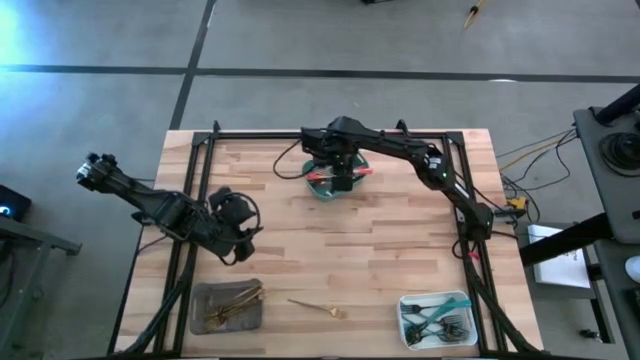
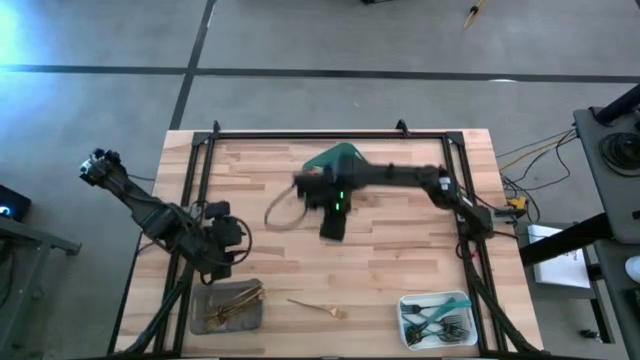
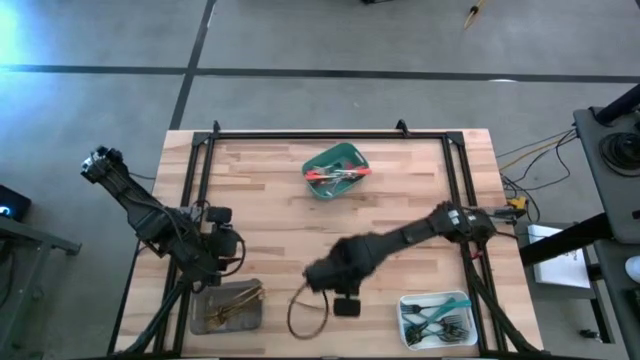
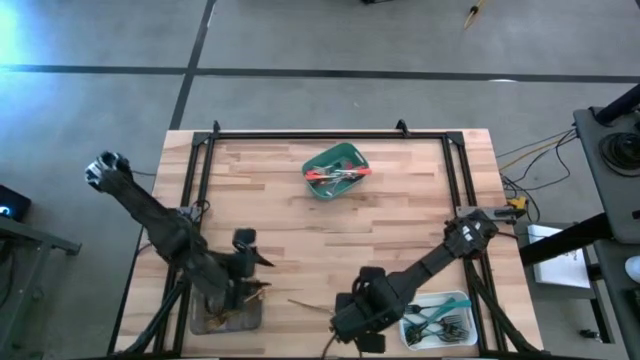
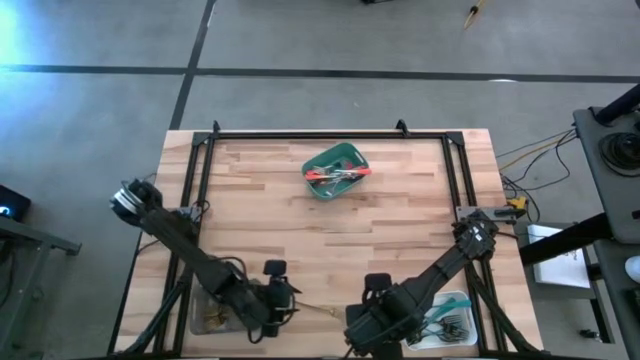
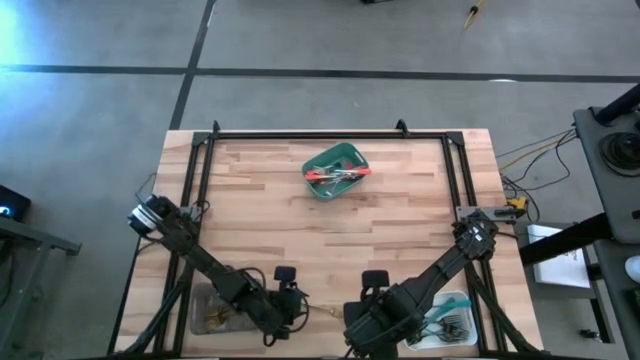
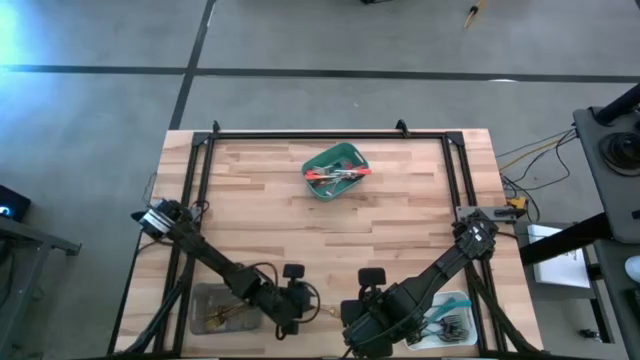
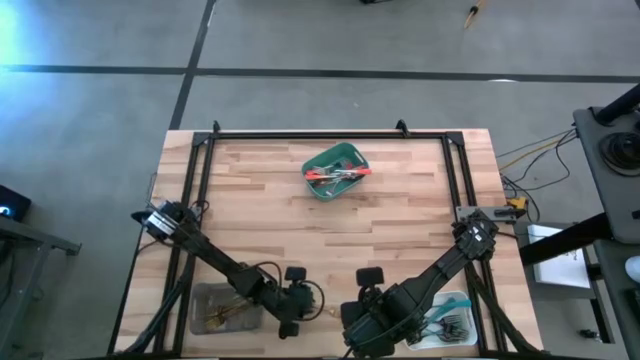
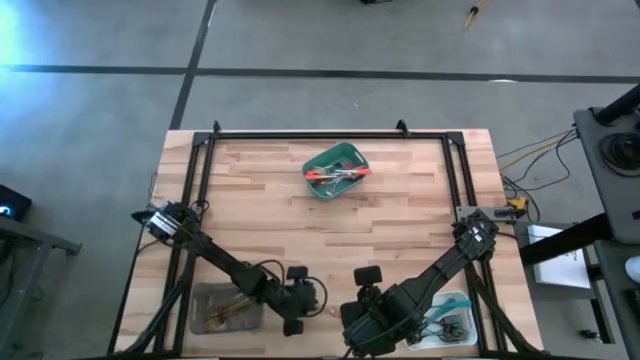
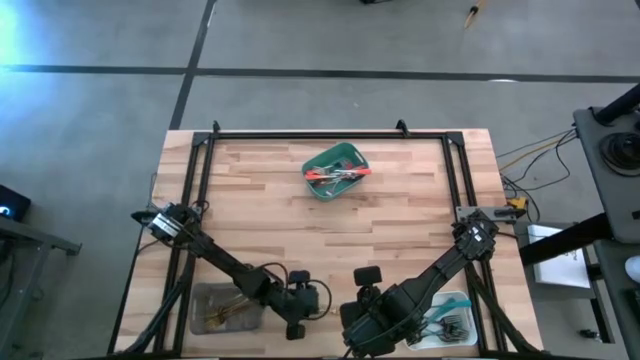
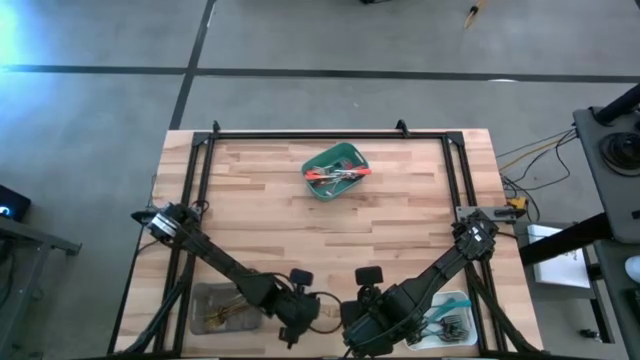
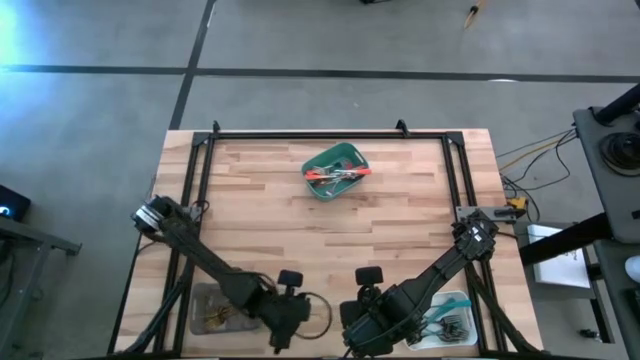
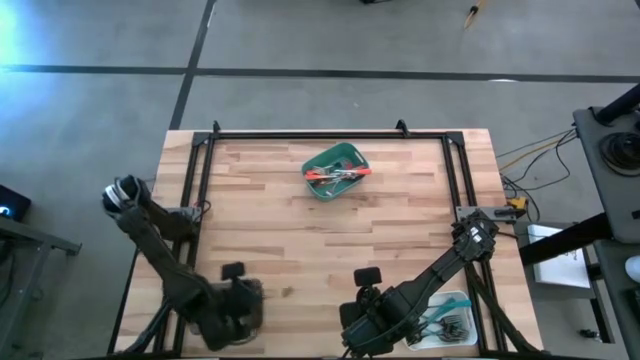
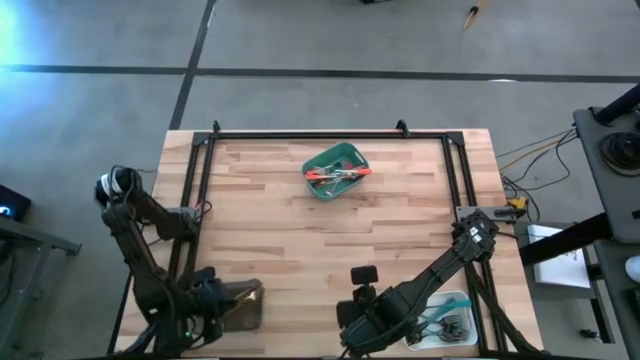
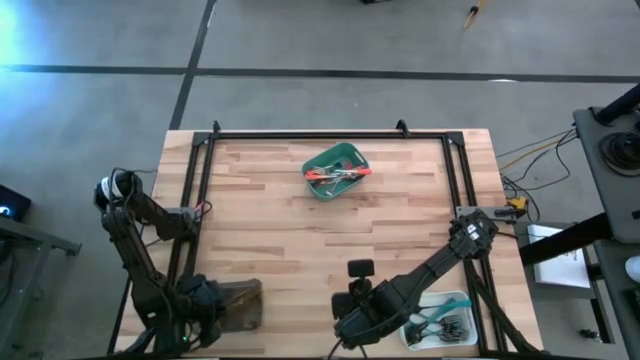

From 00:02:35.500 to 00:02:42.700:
Task: Sort silverware by color (type)
Put the gold fork into the black bin

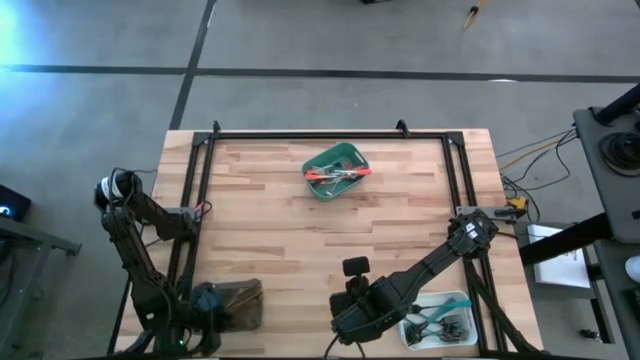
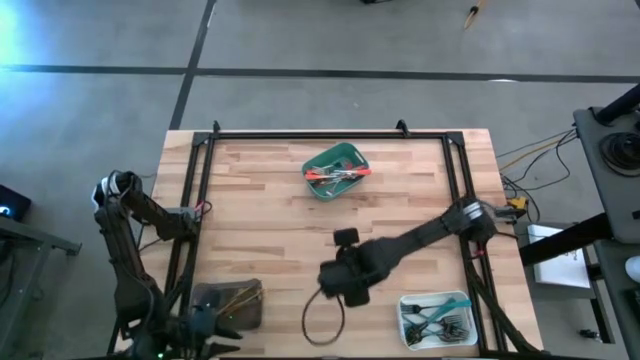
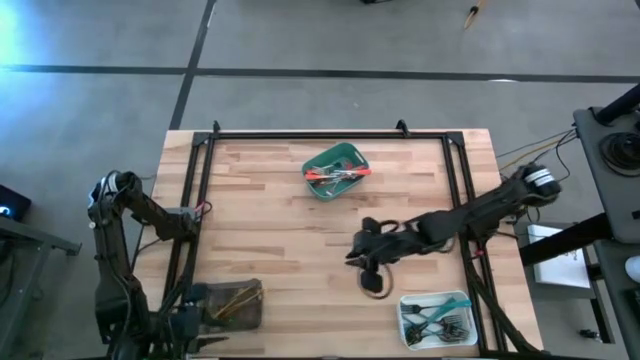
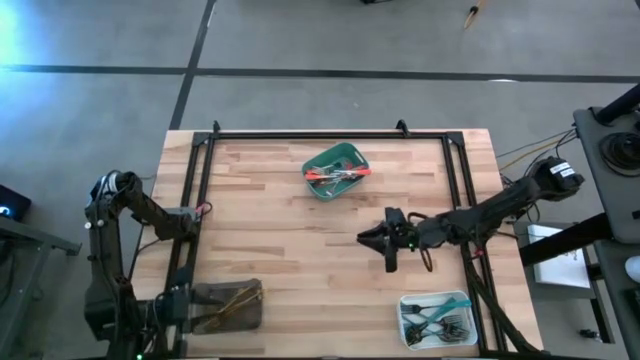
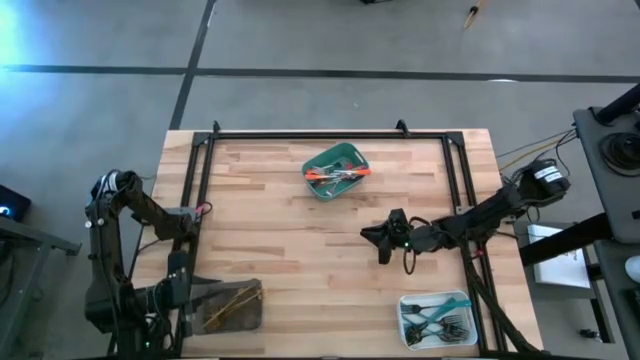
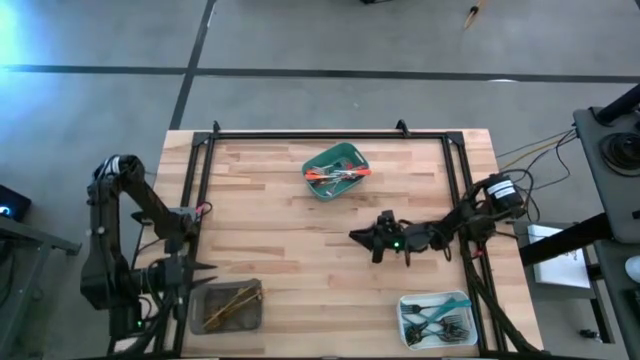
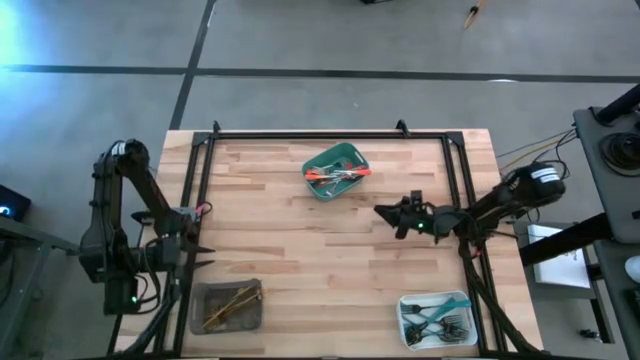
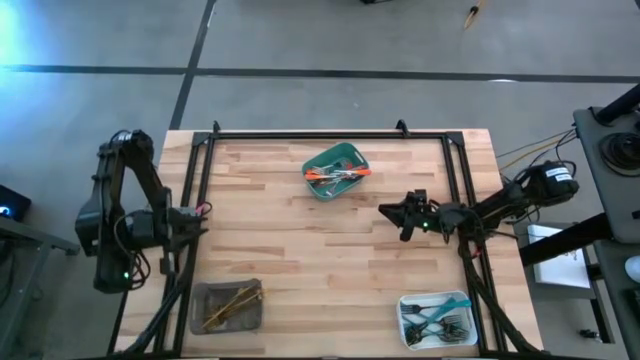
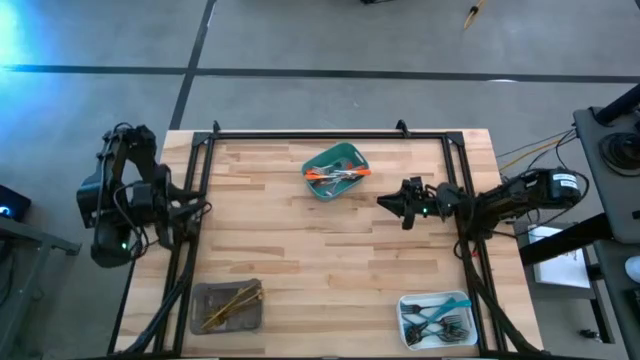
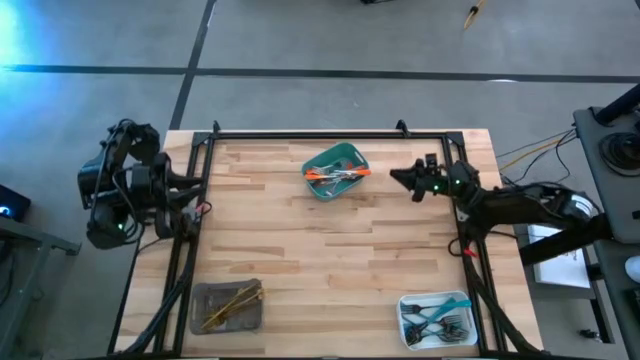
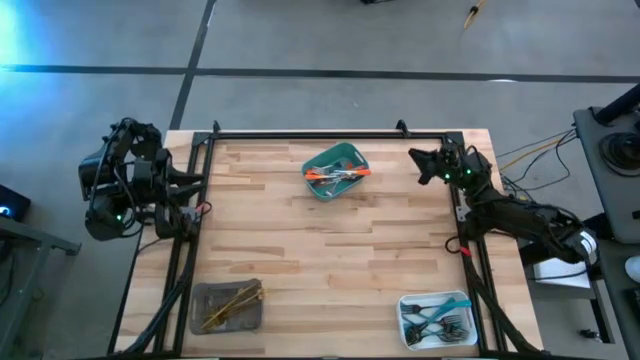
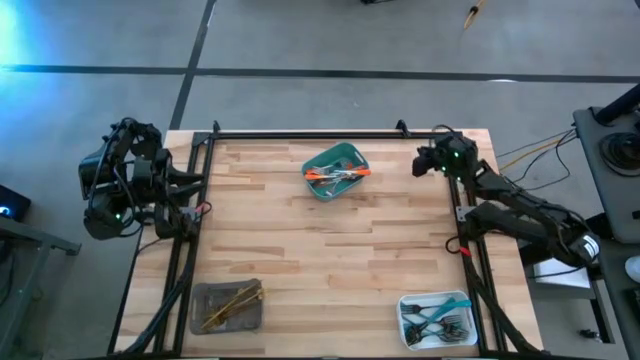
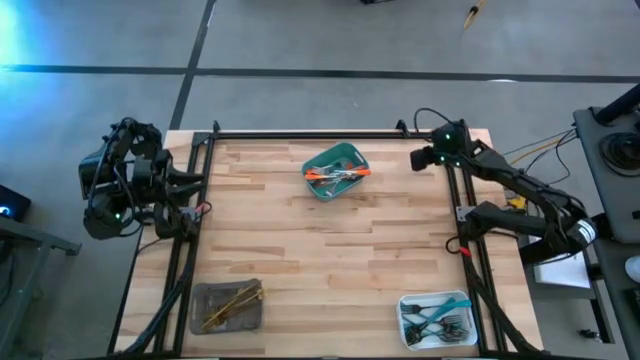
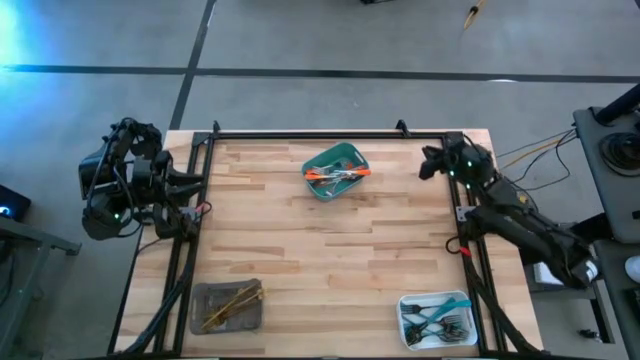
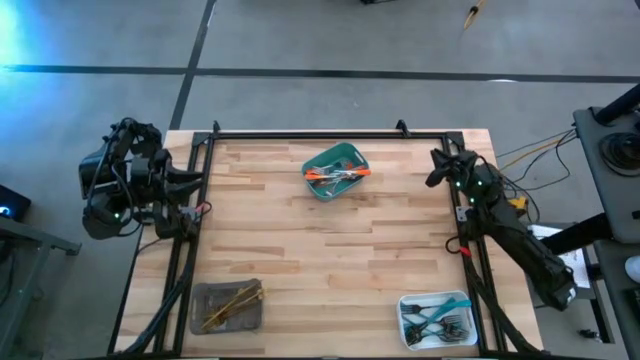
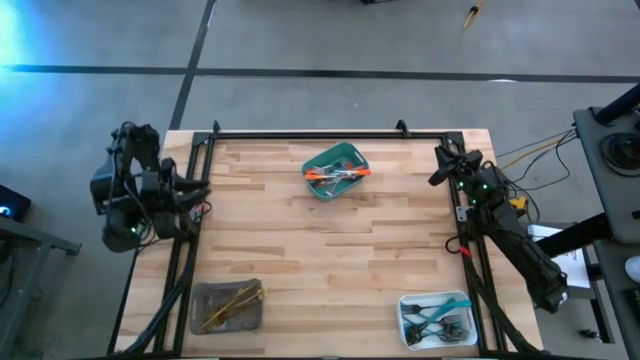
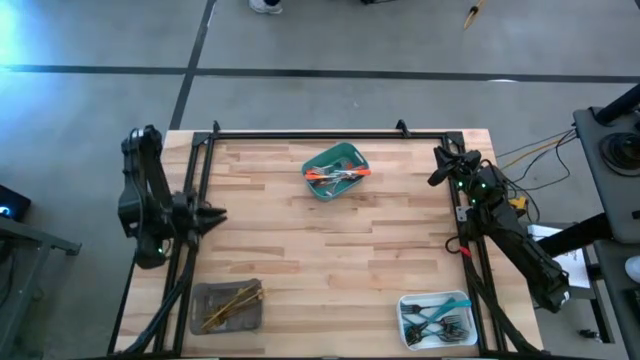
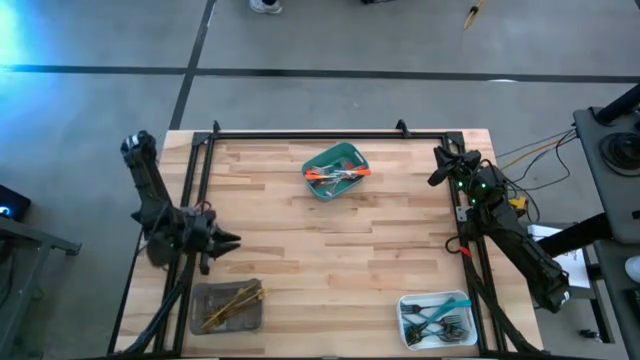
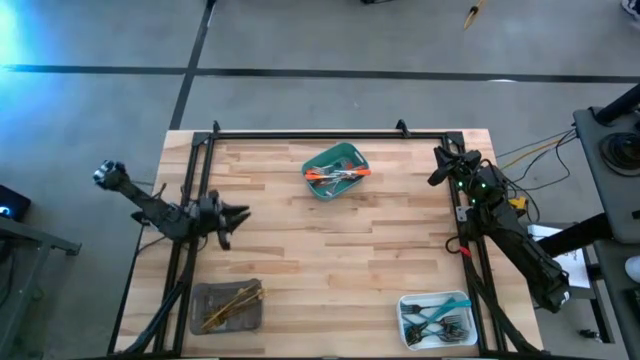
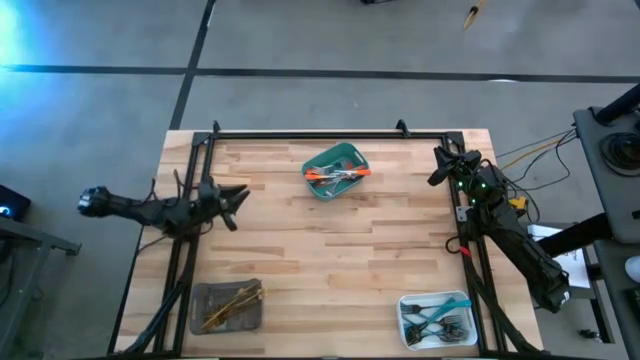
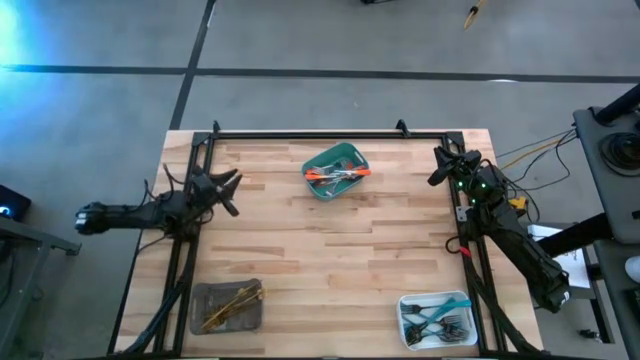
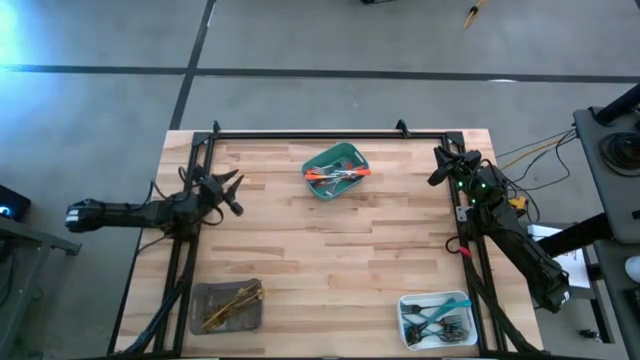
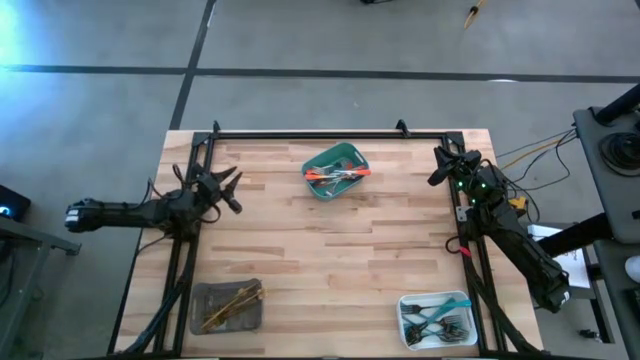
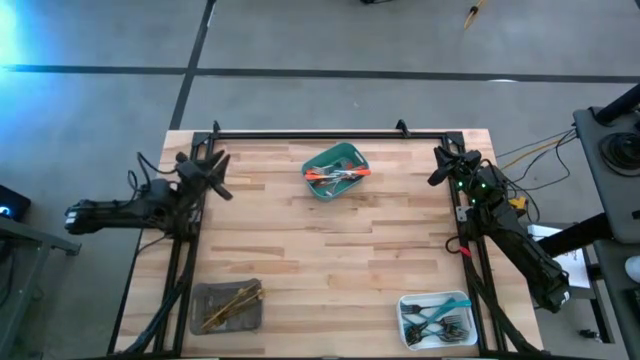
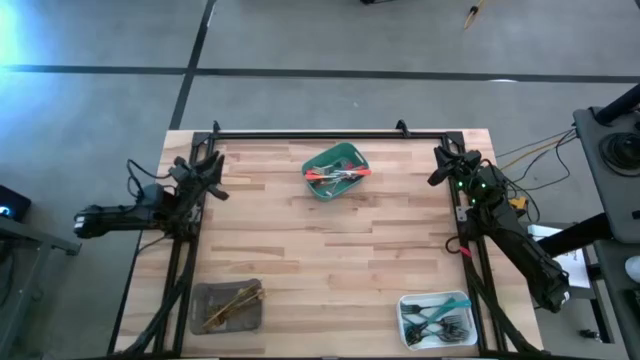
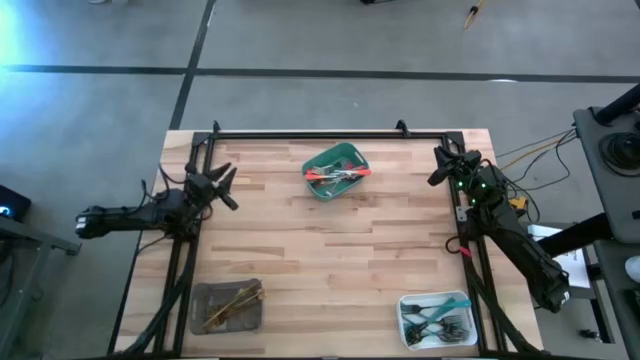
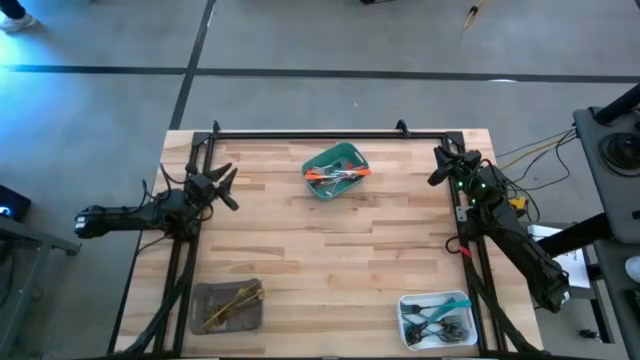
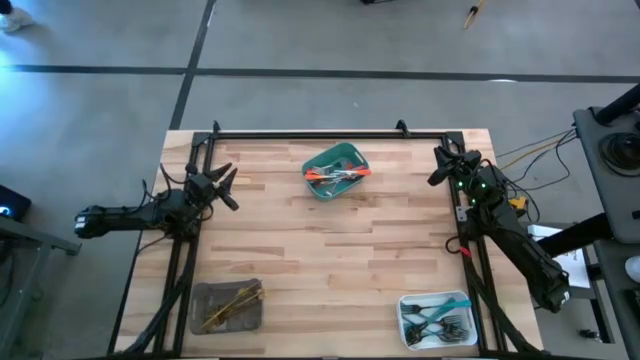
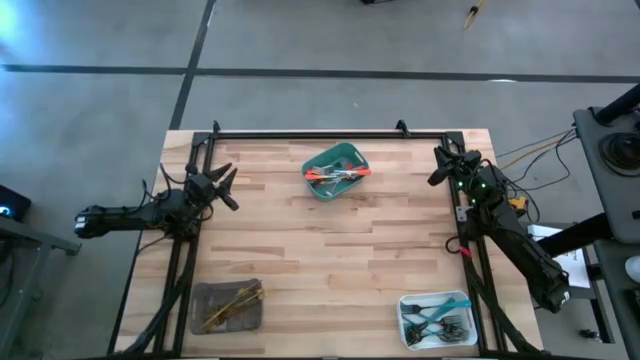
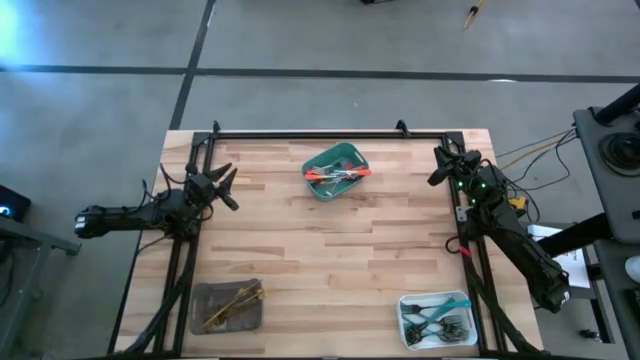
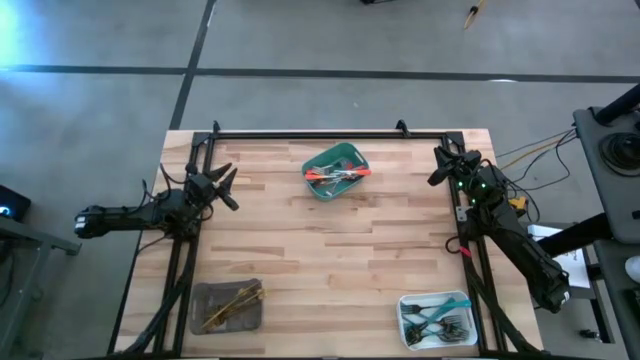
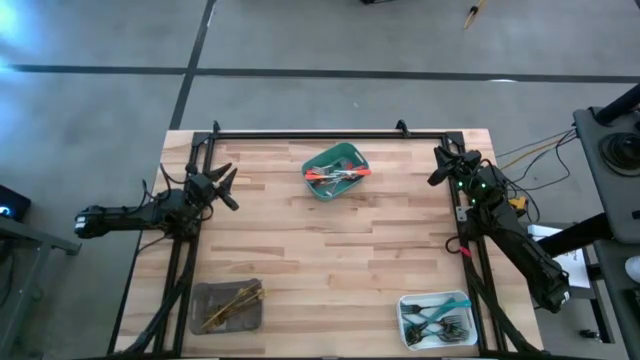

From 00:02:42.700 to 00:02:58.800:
Return to Home Position
